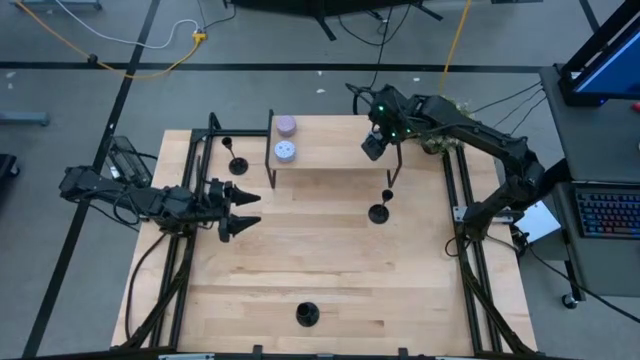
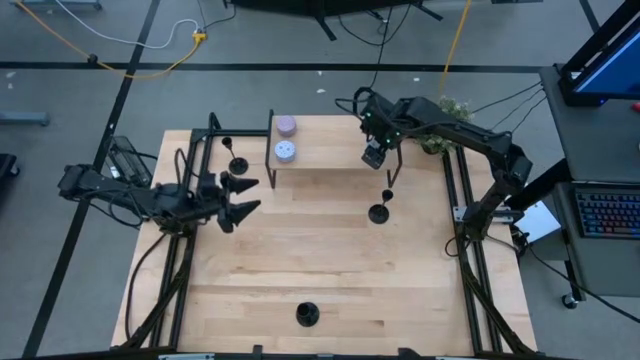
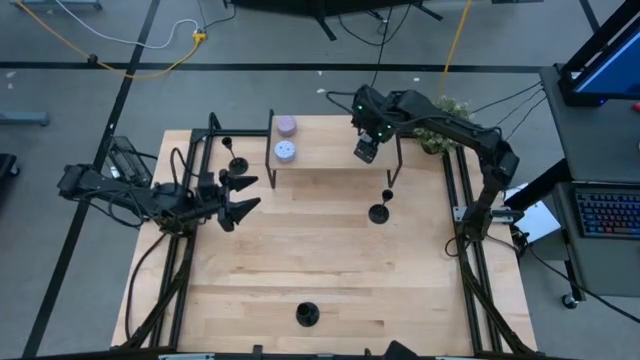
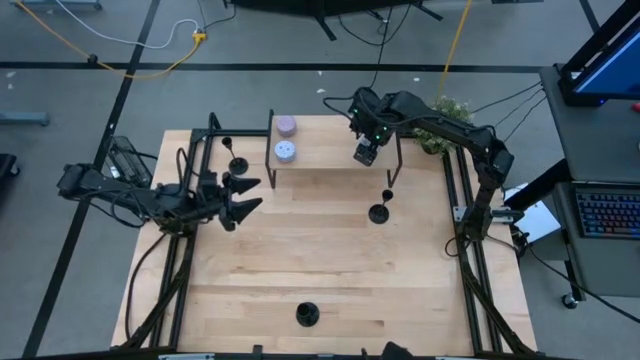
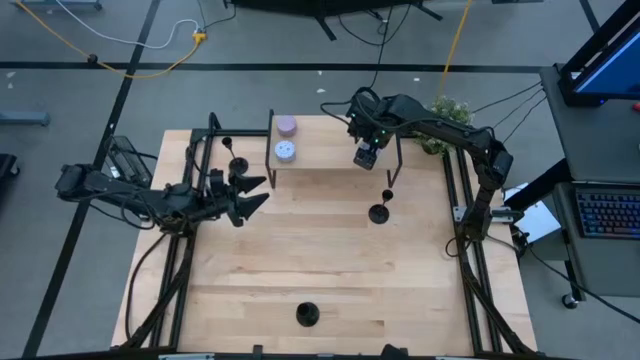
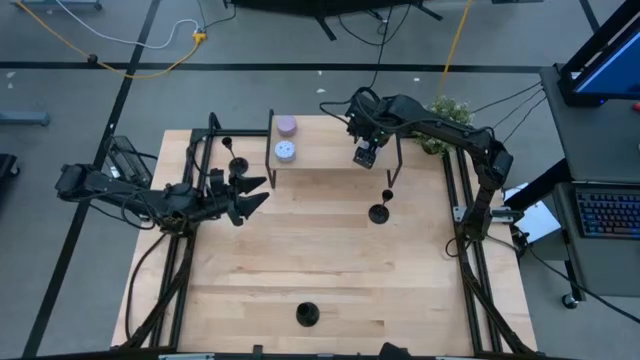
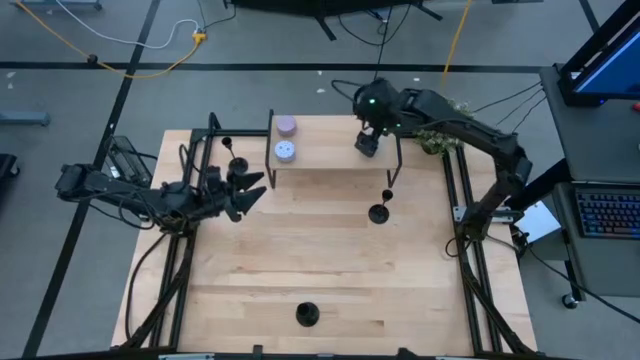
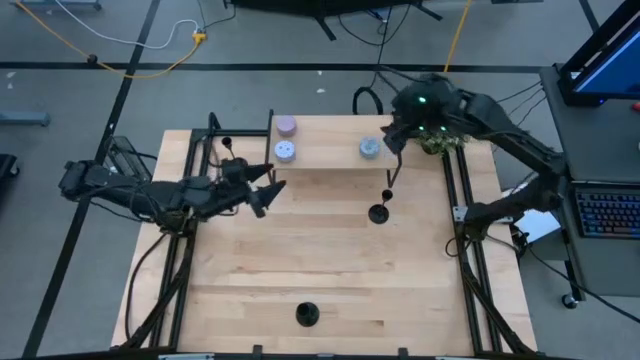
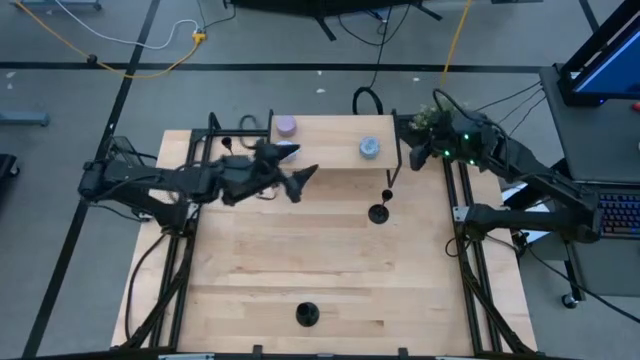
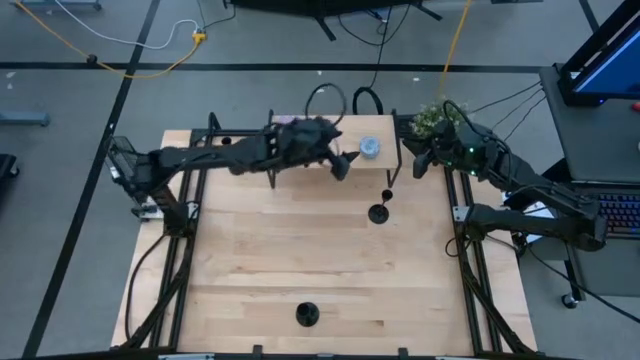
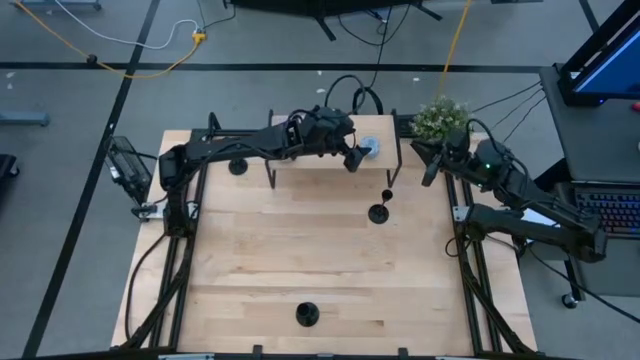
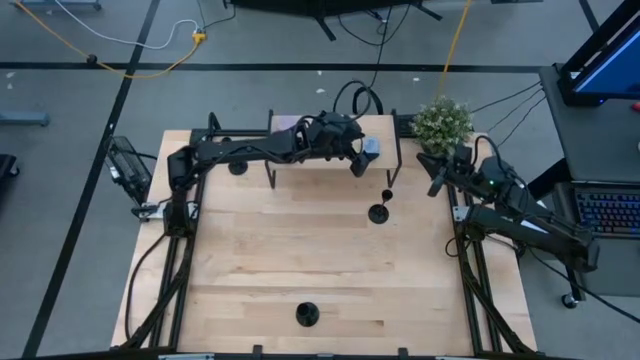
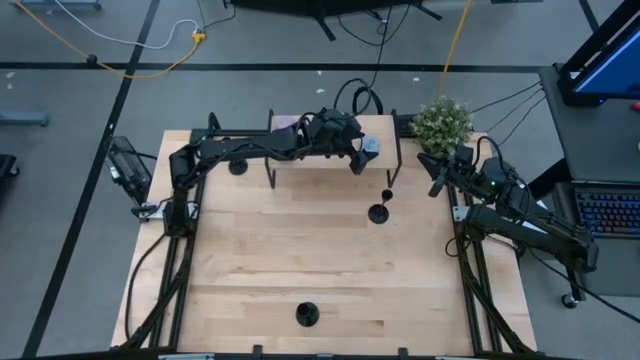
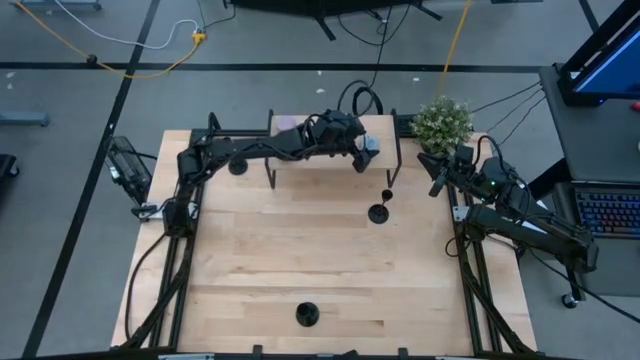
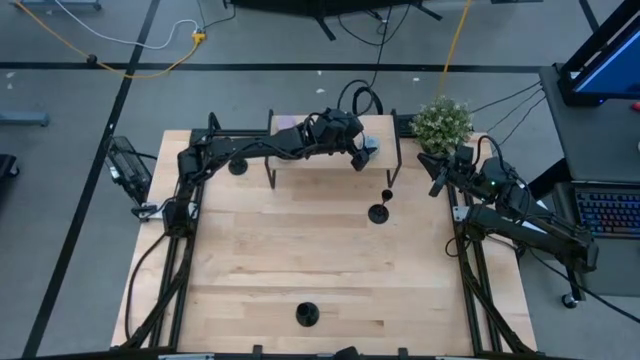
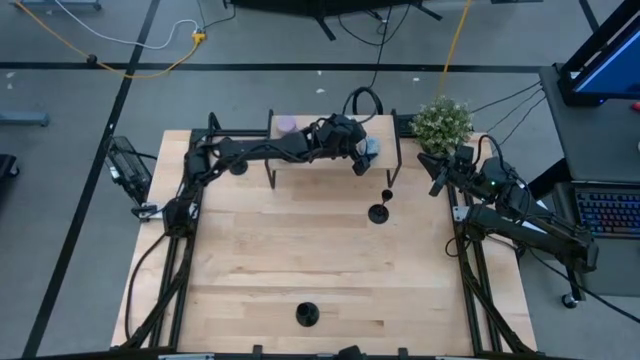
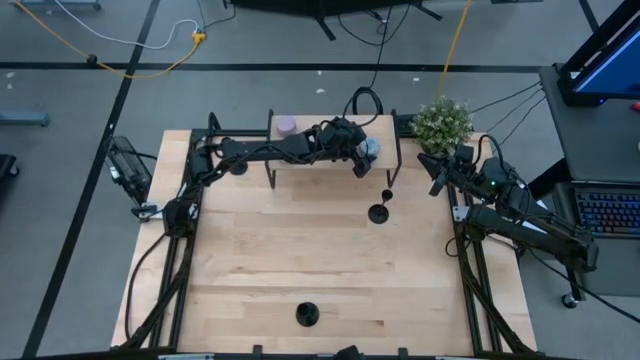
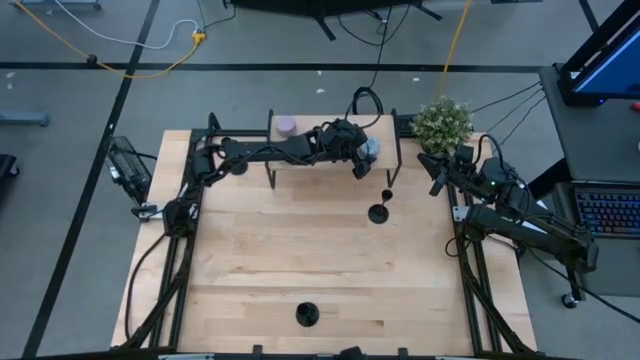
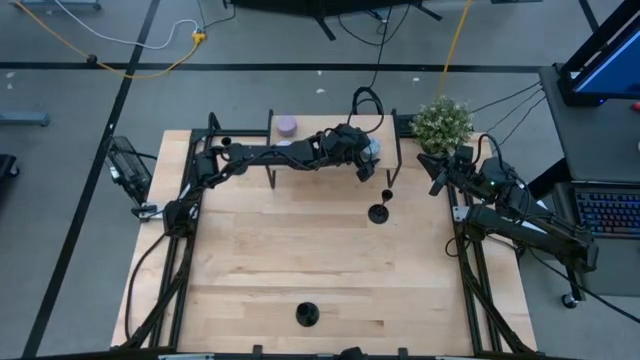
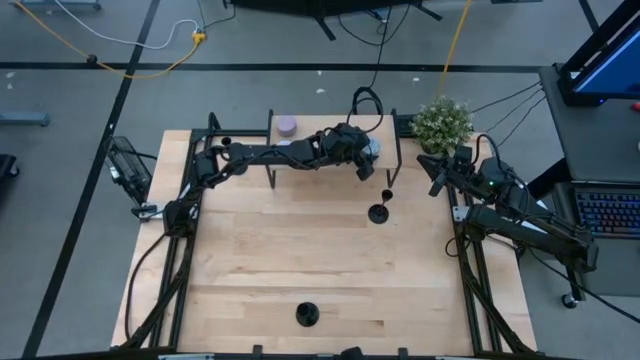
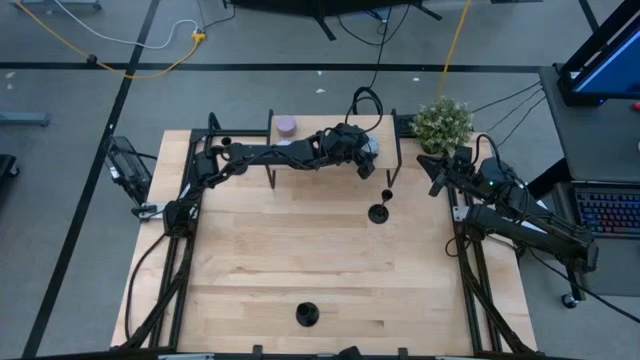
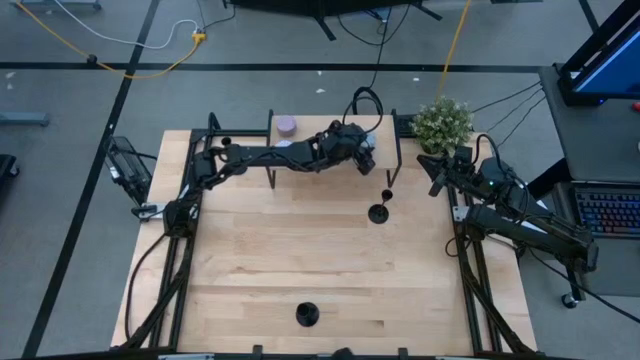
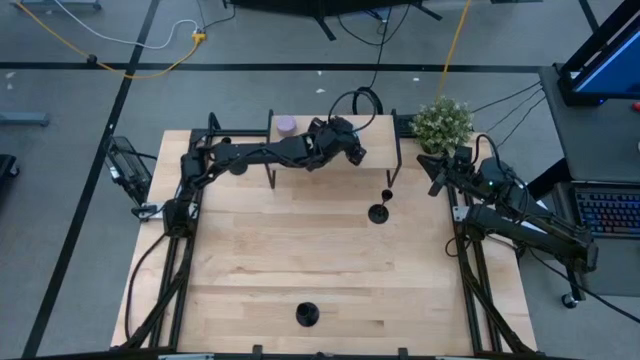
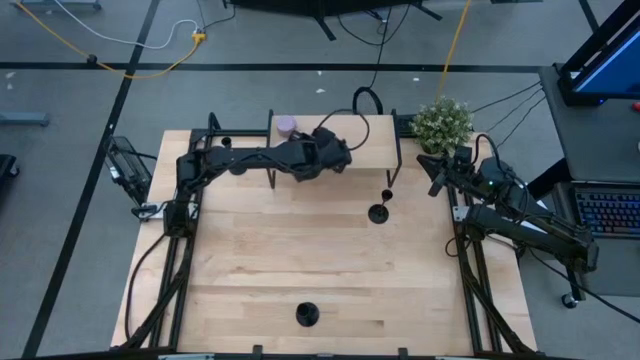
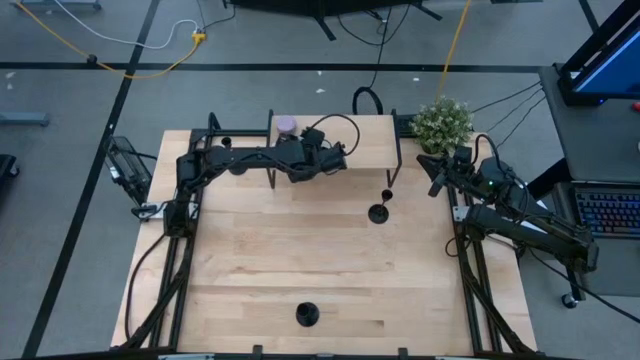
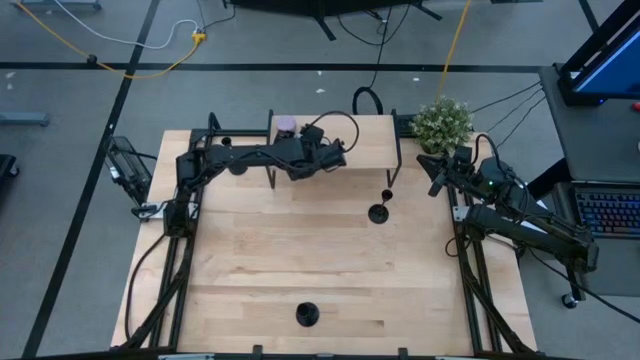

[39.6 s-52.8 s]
Task: Pick & Place candle stick holders
Put the blue patterned scented candle on the shelf

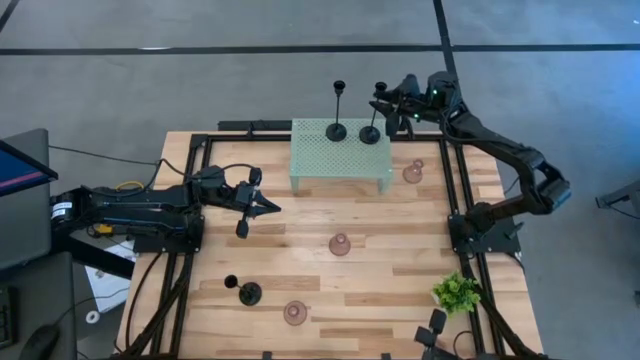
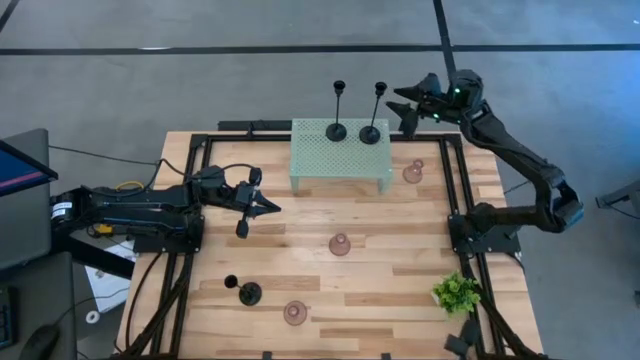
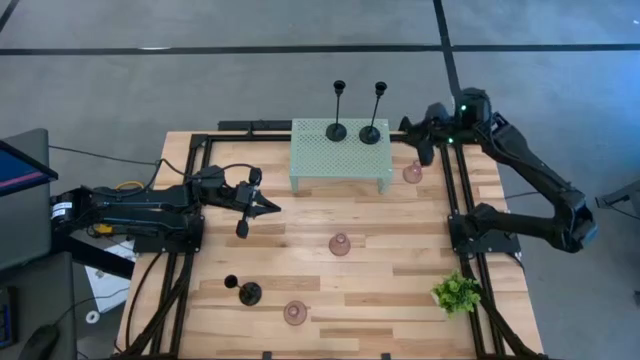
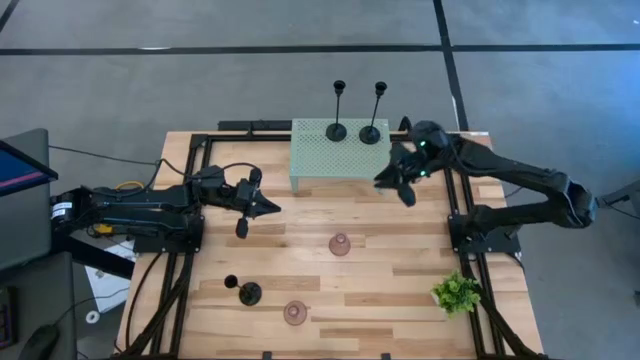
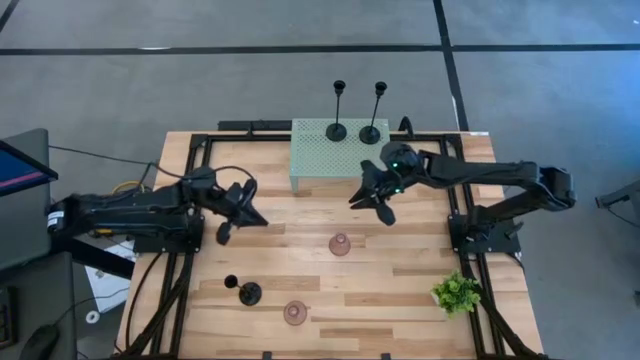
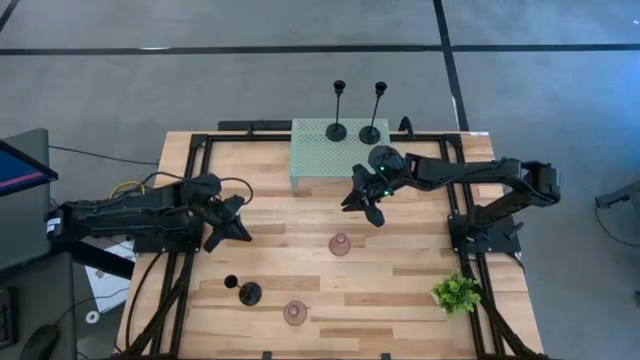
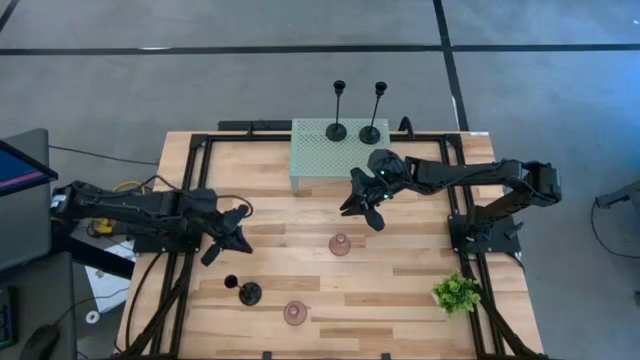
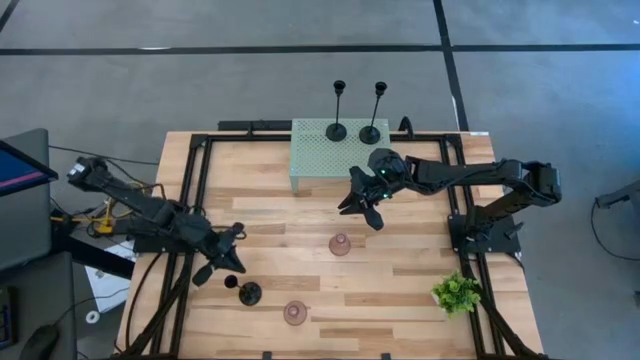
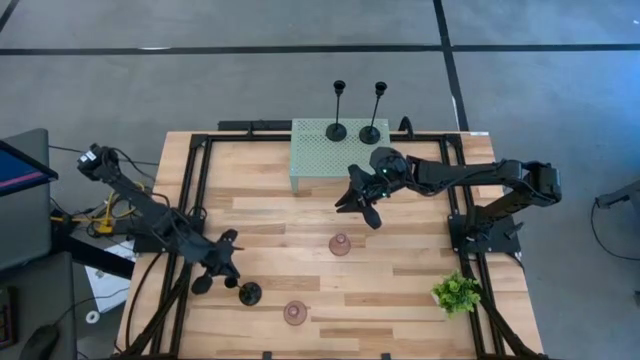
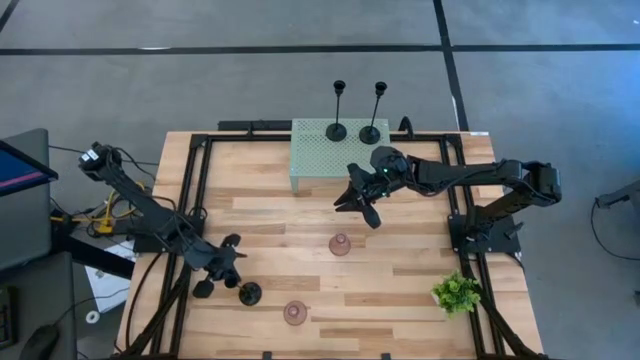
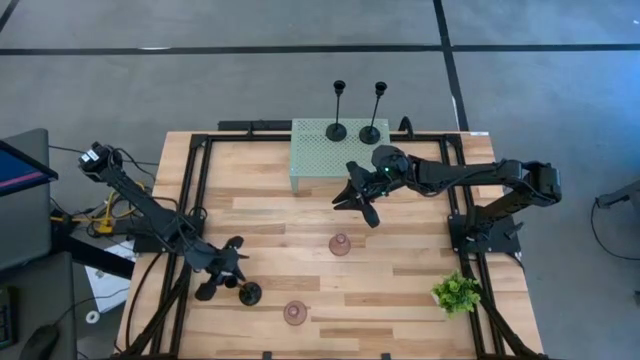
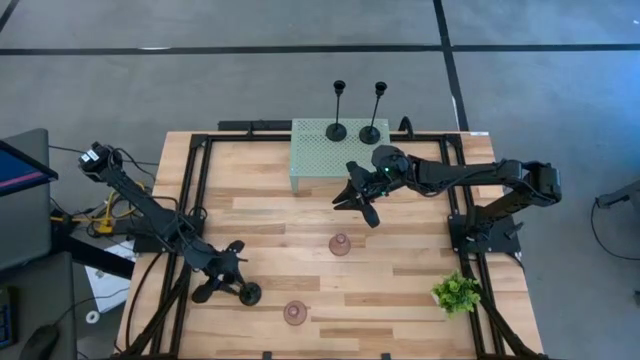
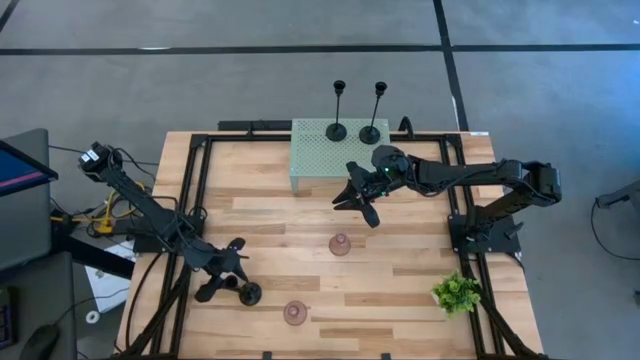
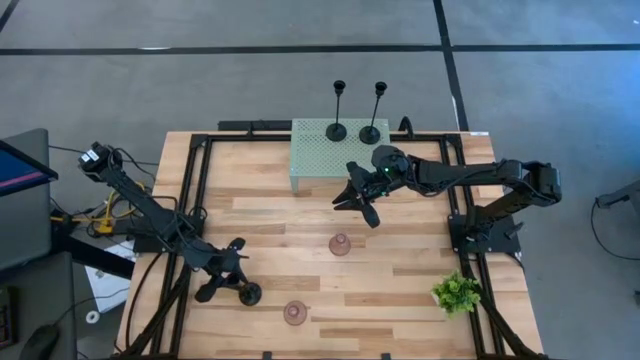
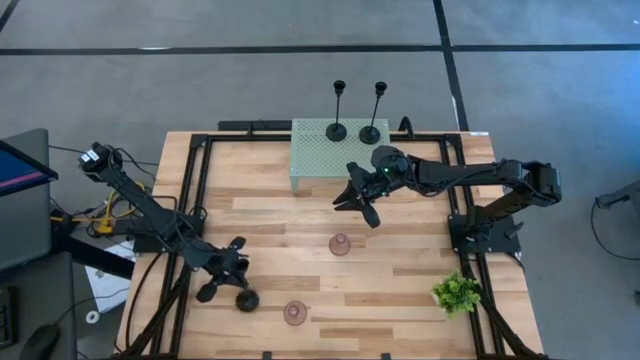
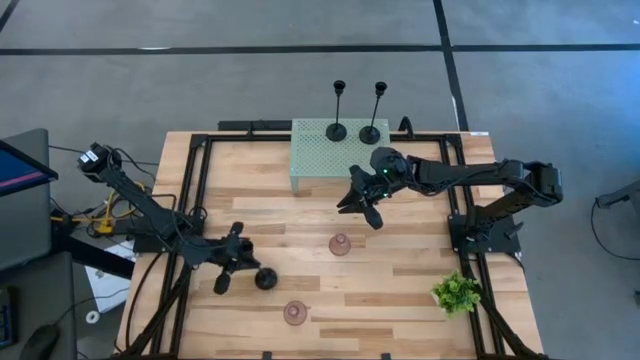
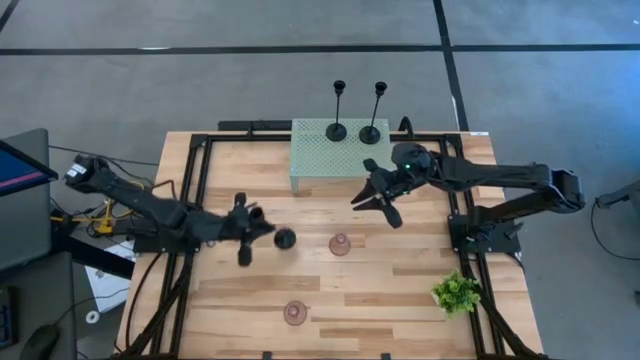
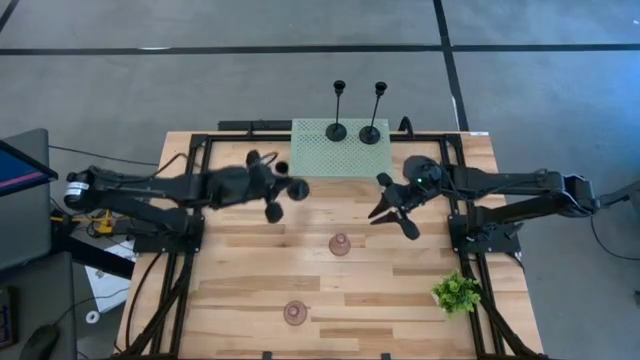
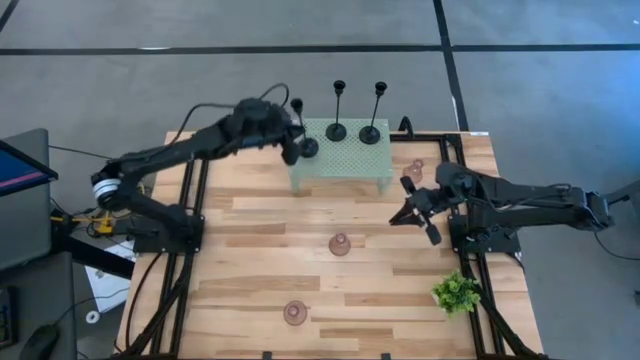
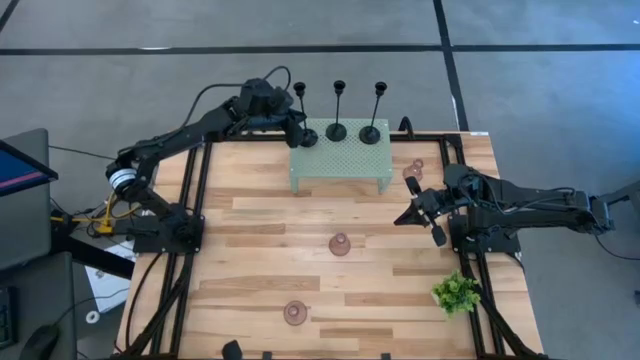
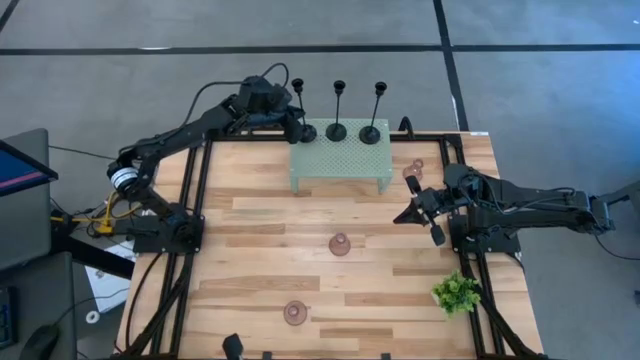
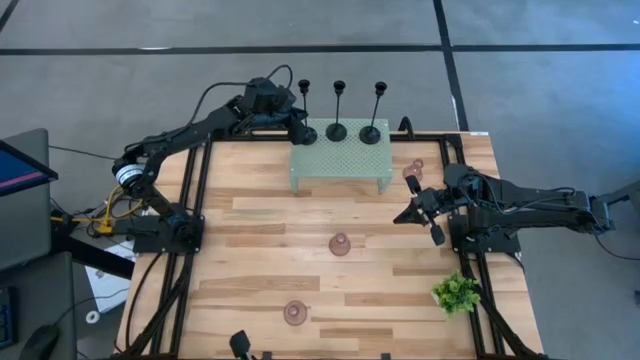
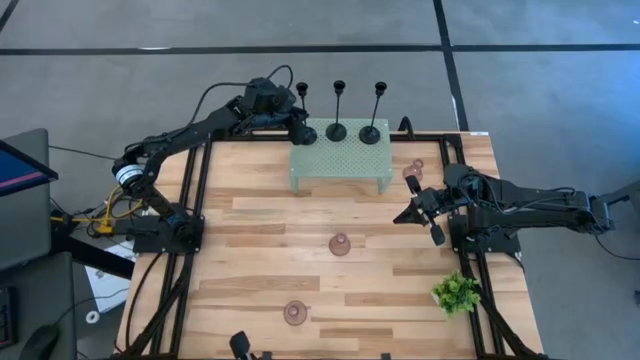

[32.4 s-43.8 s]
Task: Pick & Place candle stick holders
Put the black candle holder on the shelf
